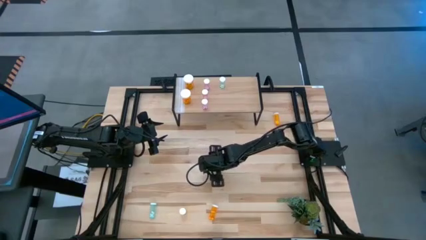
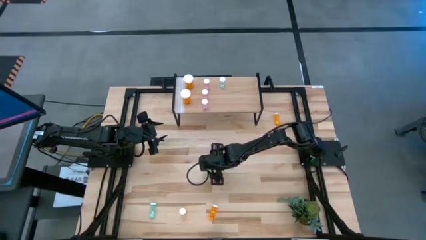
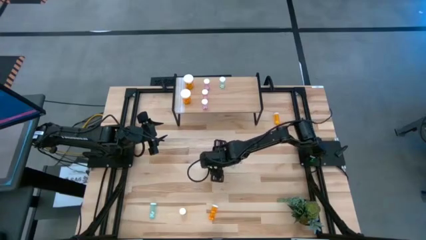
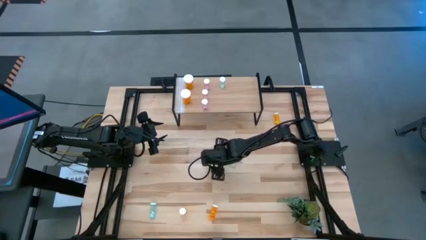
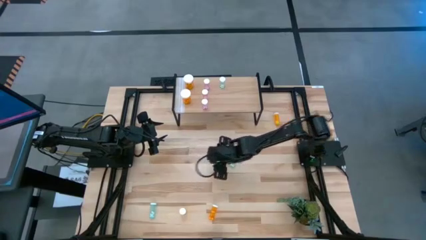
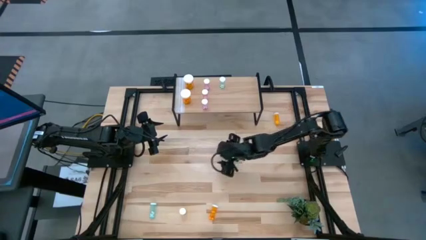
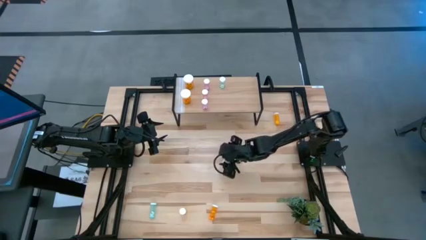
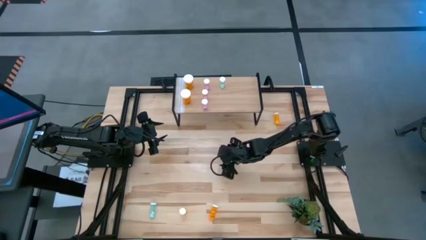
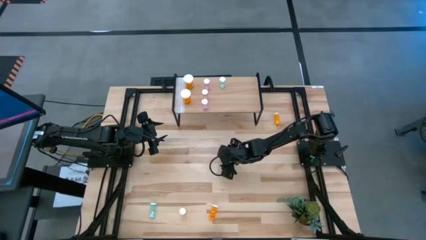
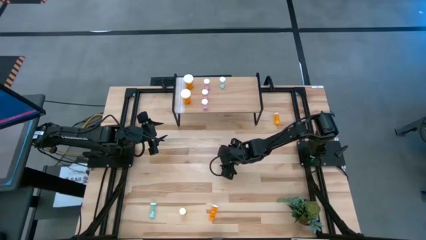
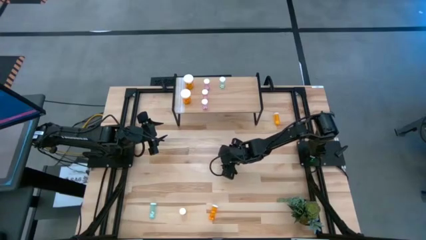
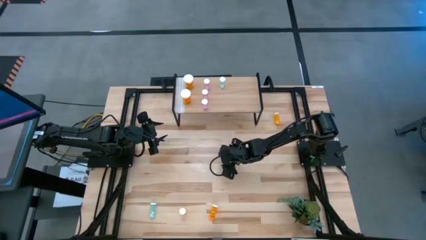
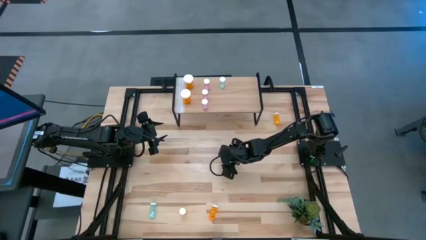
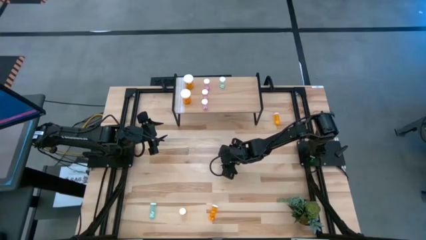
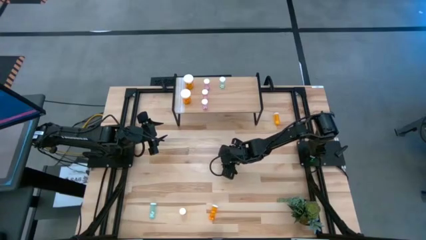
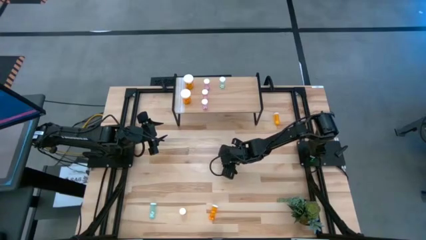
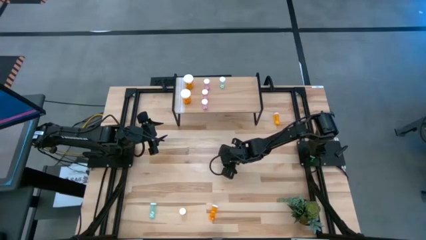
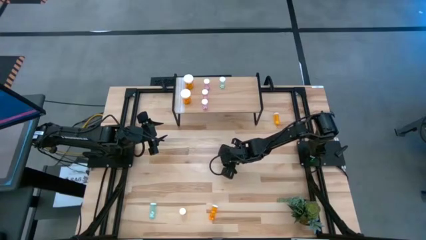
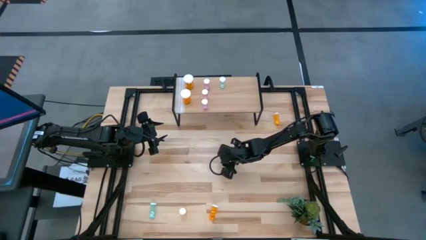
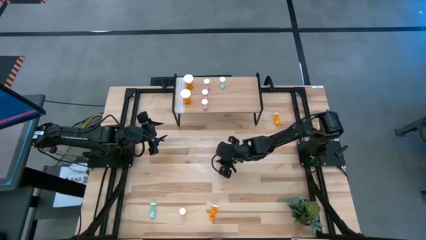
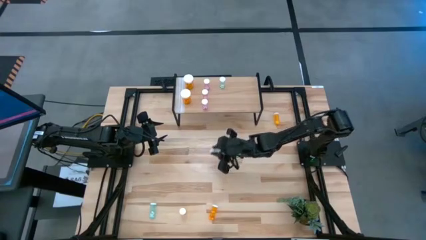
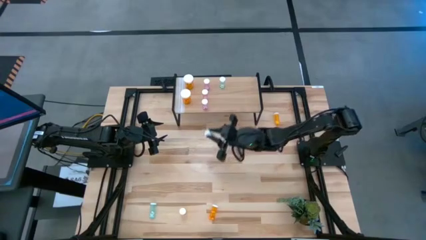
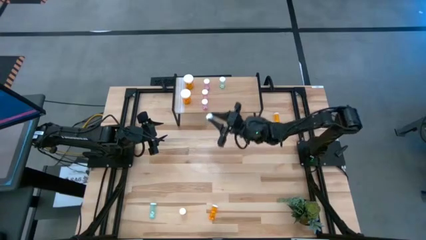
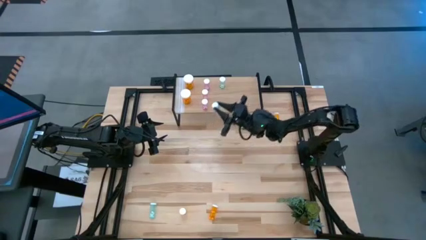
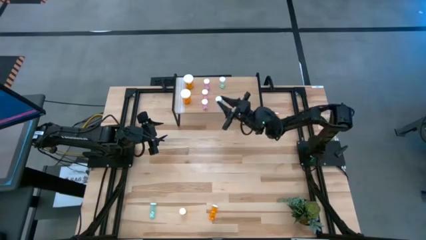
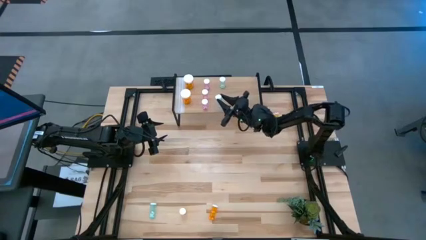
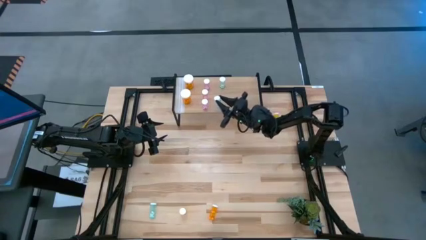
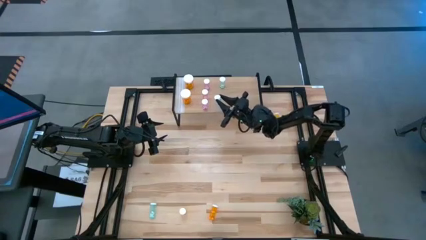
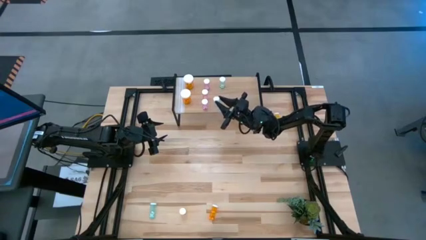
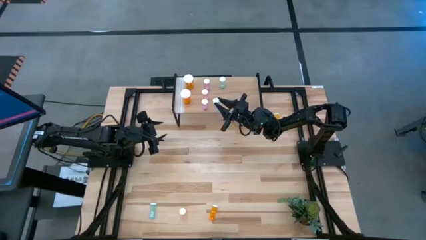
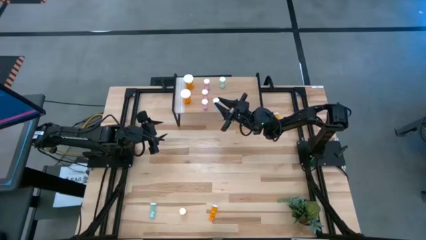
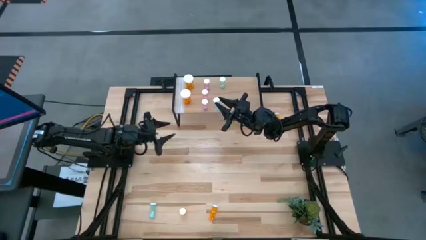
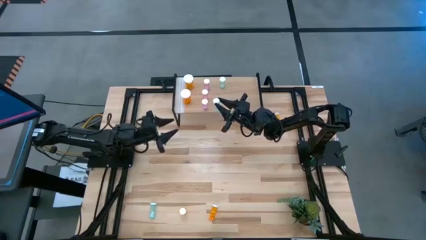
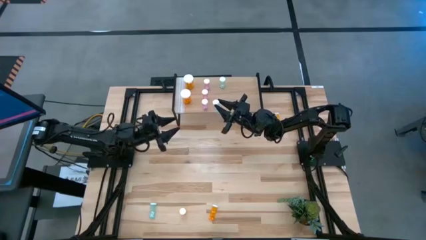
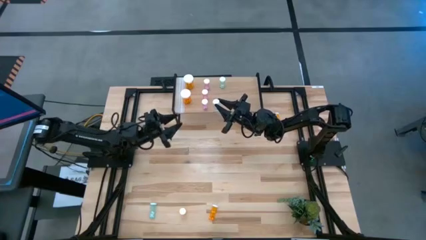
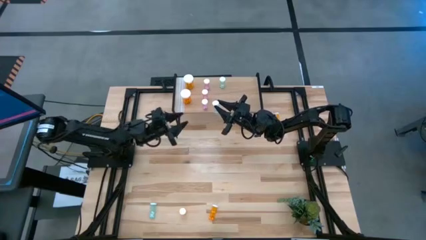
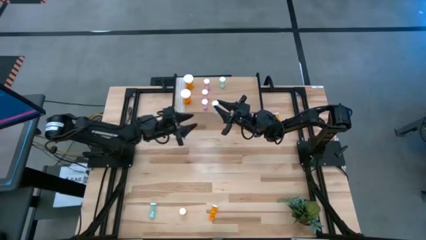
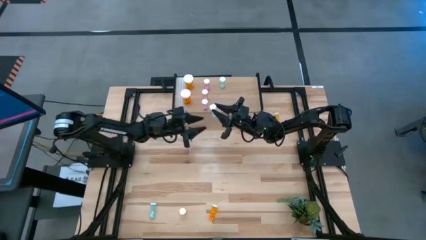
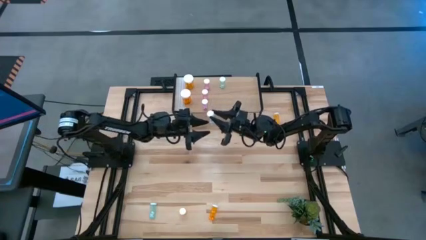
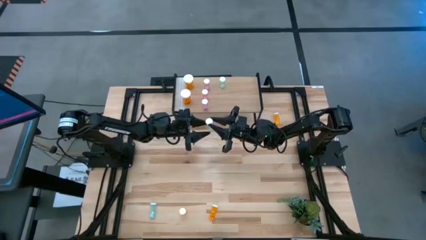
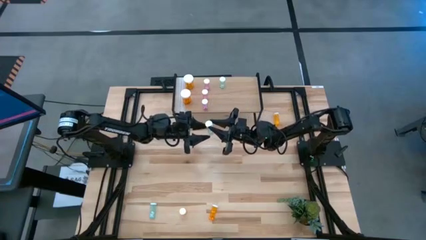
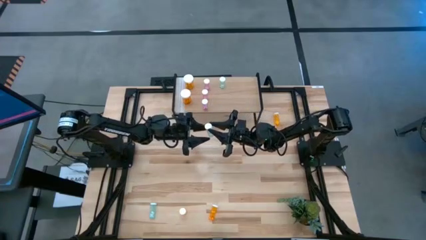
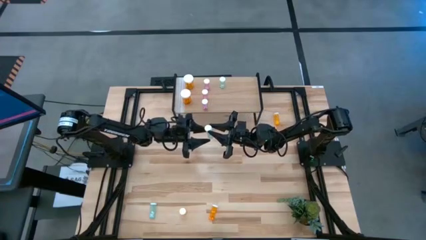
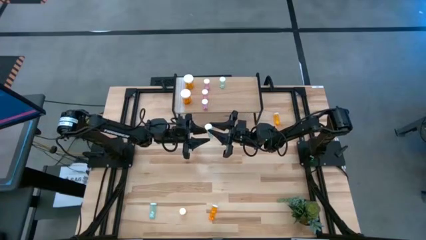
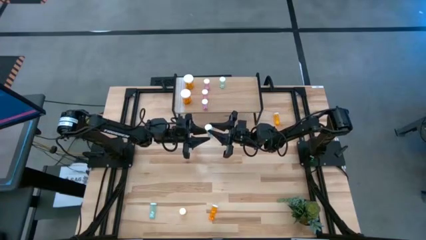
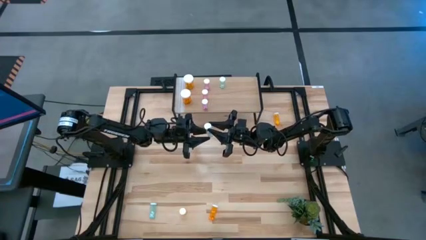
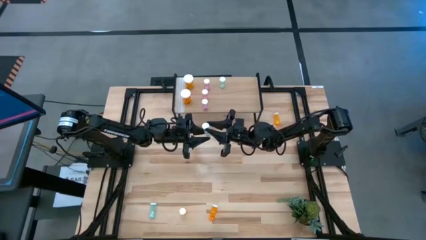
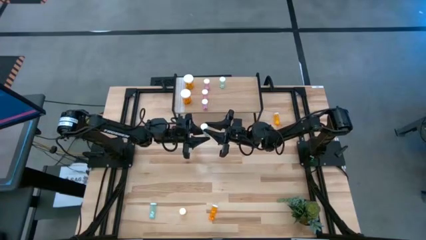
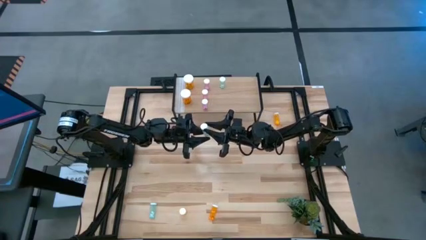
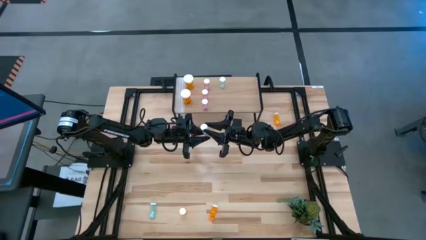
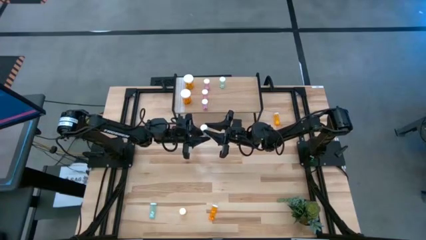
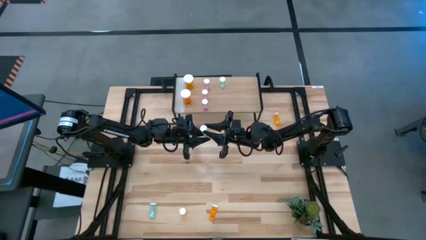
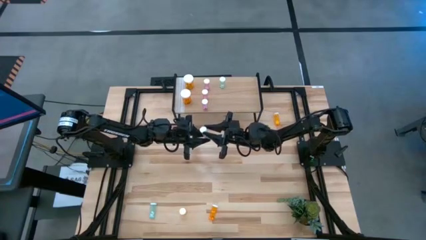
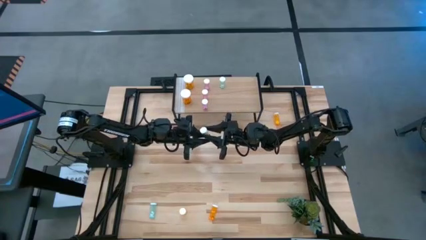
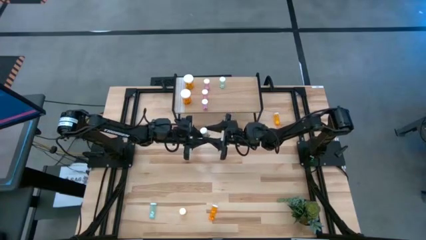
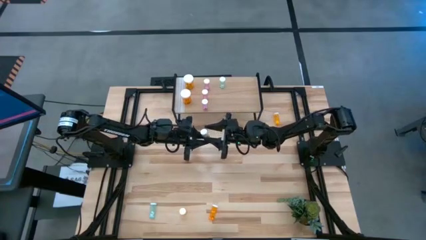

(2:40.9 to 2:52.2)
Task: Pick and place medicine bottles onto shelf by color
Put the top small blue pill bottle aligned with other small blue pill bottle on the shelf

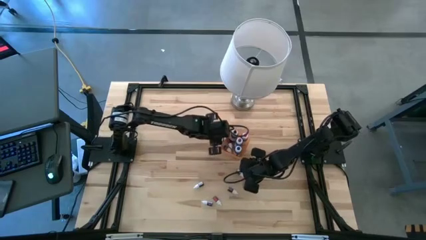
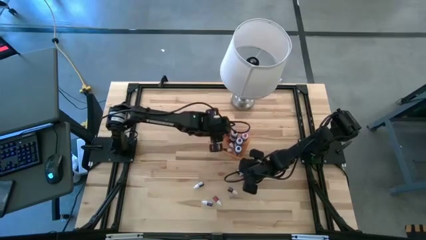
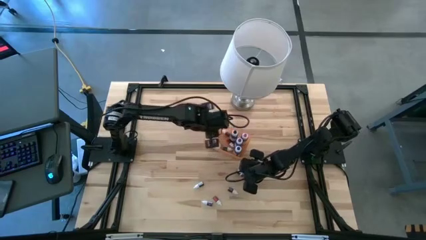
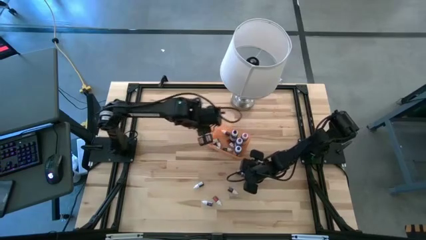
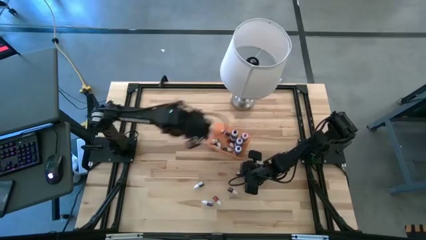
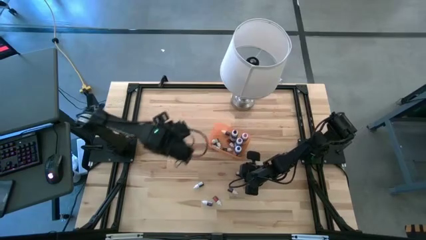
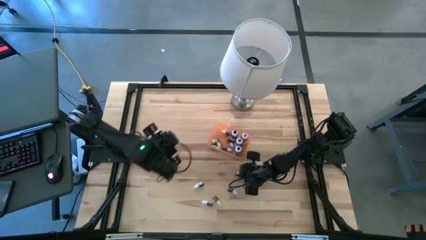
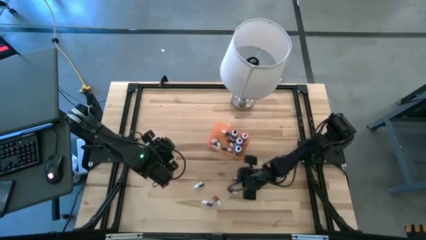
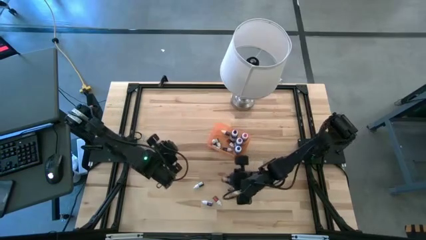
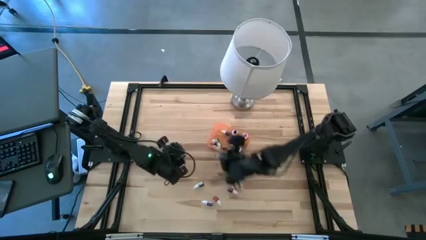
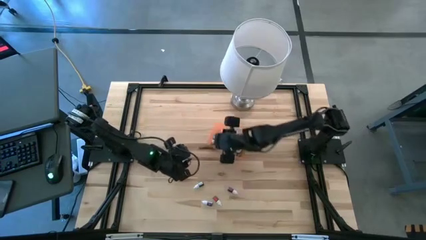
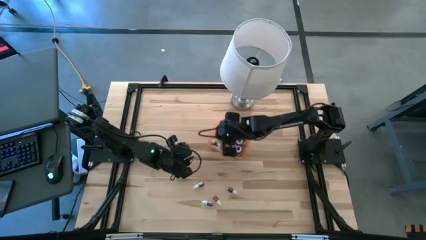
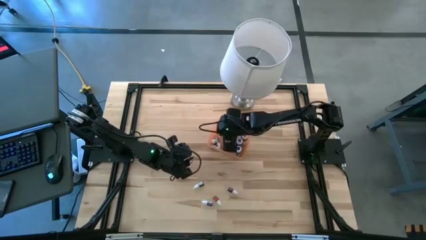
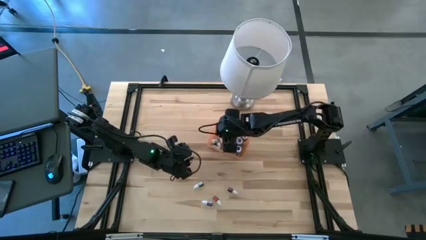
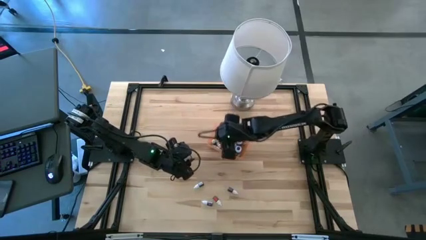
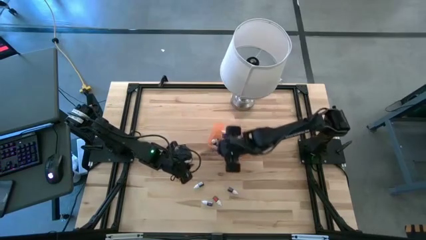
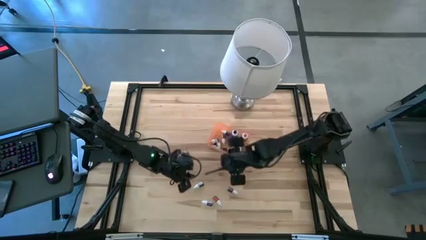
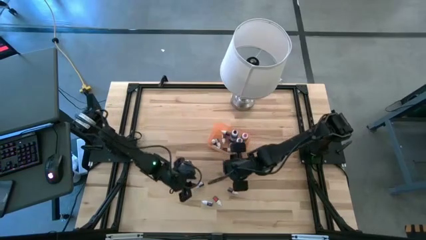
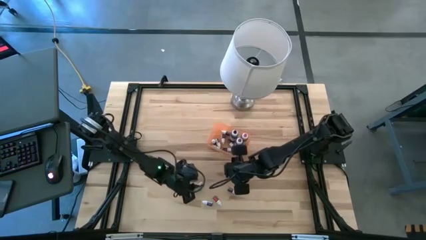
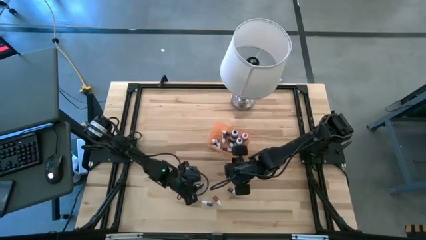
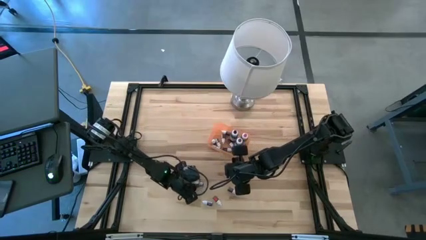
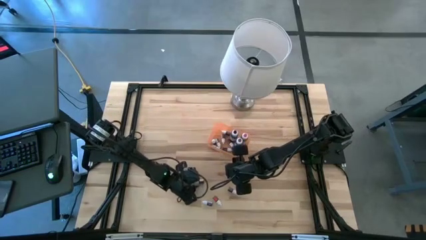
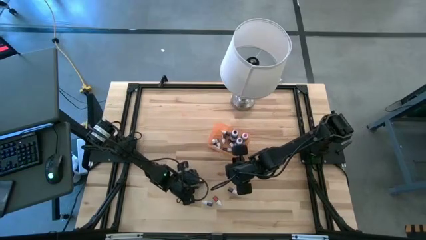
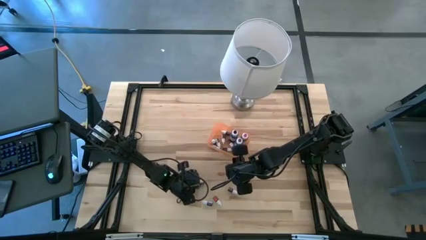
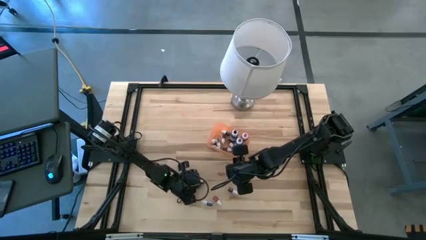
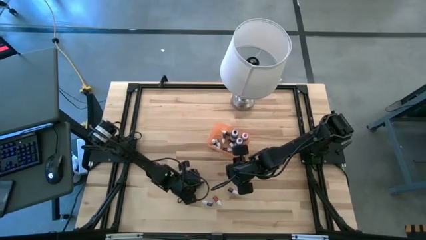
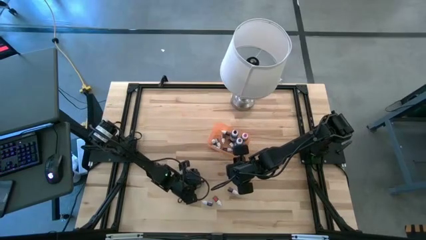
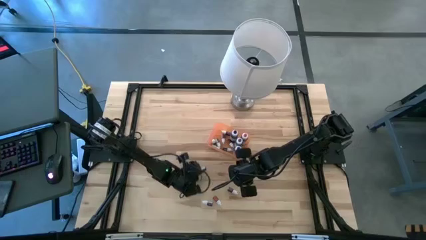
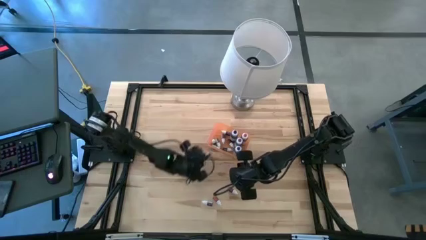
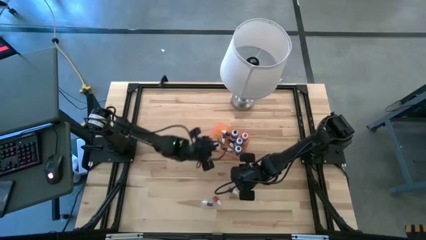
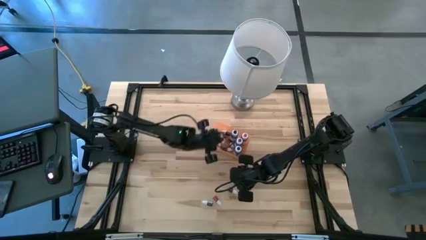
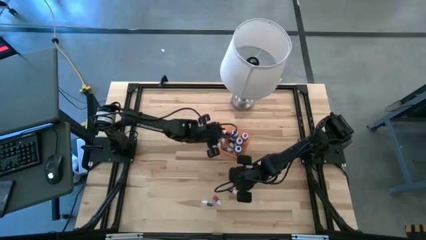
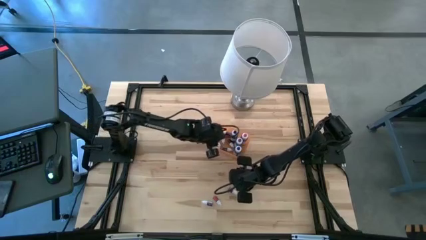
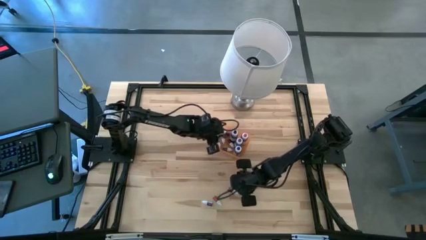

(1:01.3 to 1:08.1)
Task: Pick & Place food coloring
Put the small black food coloring bottle into the orange bin
